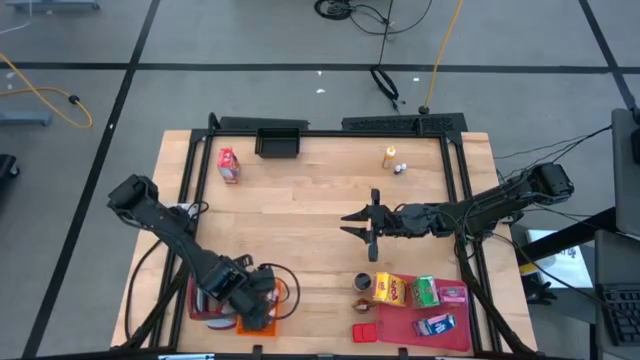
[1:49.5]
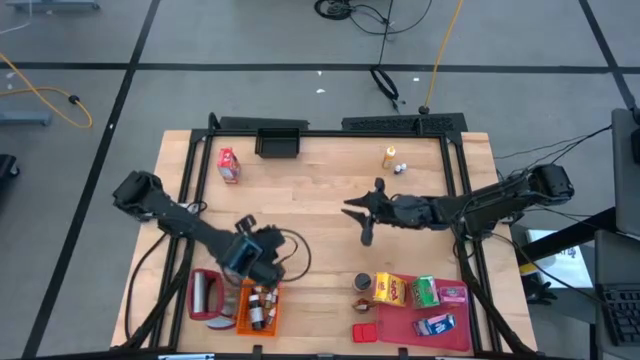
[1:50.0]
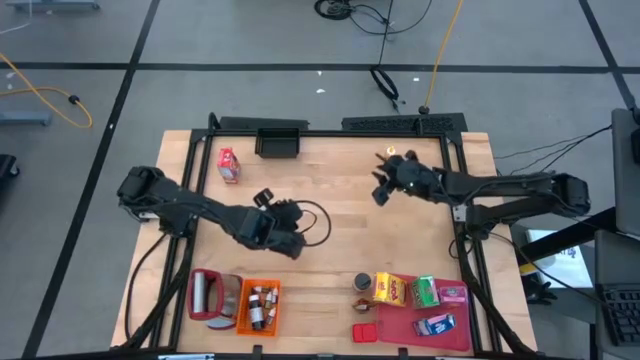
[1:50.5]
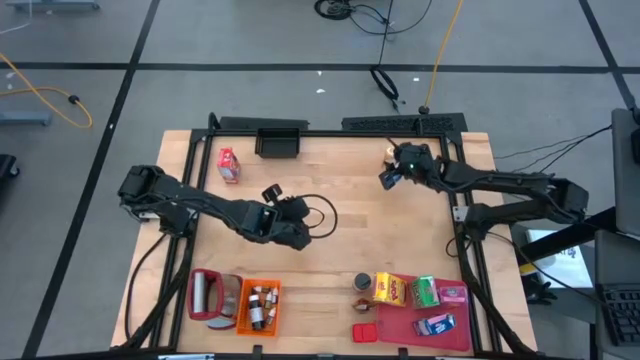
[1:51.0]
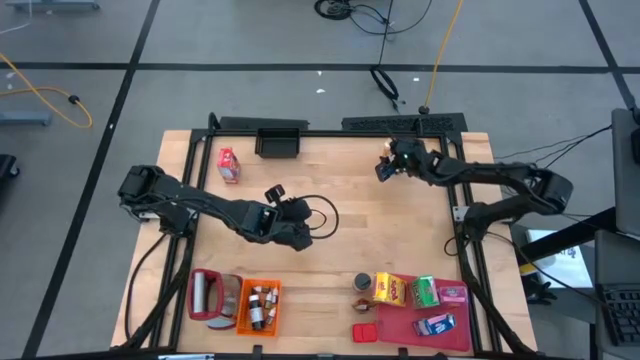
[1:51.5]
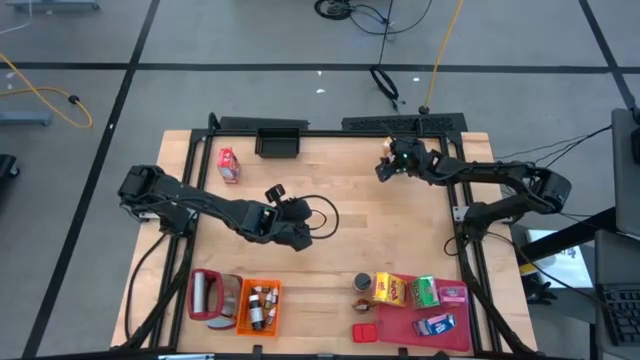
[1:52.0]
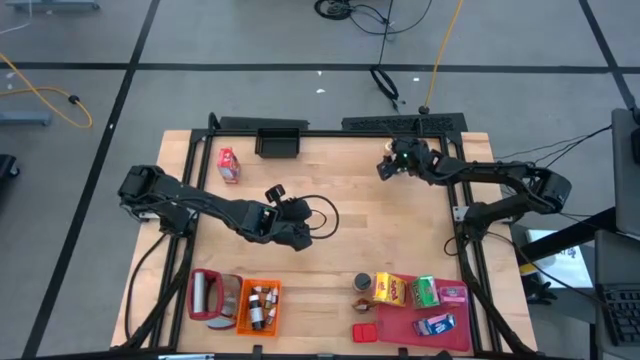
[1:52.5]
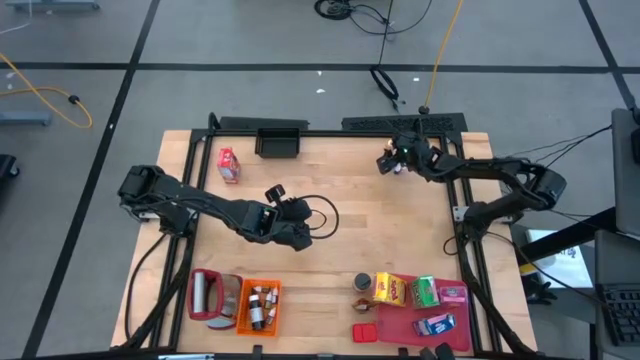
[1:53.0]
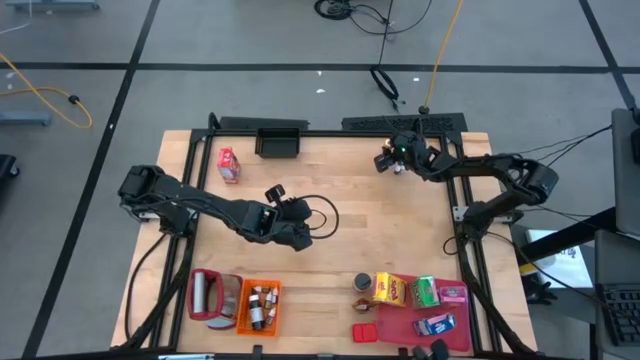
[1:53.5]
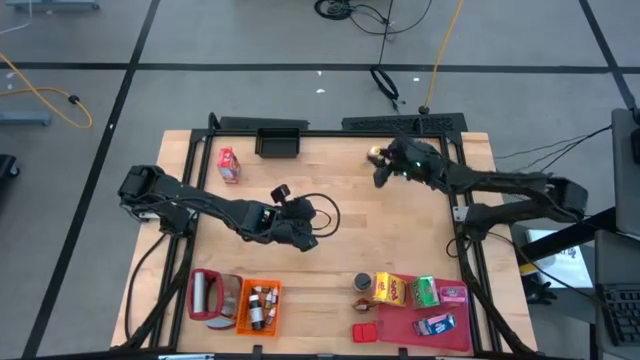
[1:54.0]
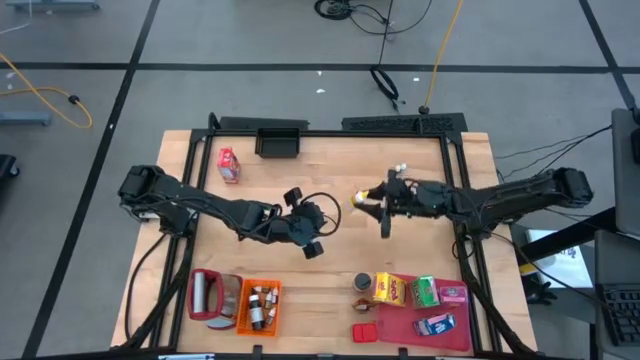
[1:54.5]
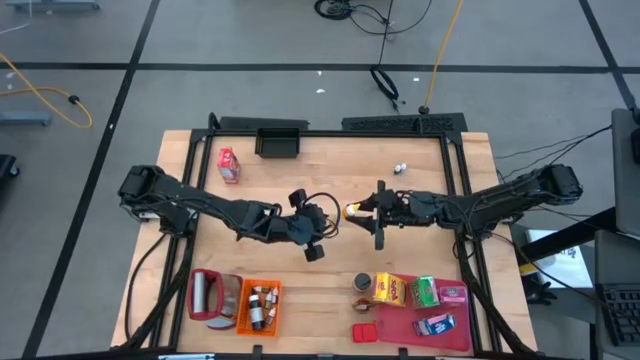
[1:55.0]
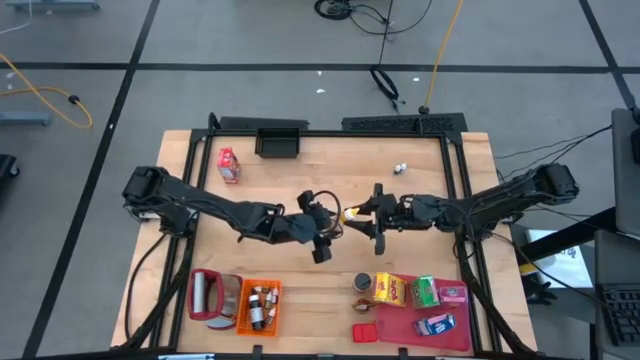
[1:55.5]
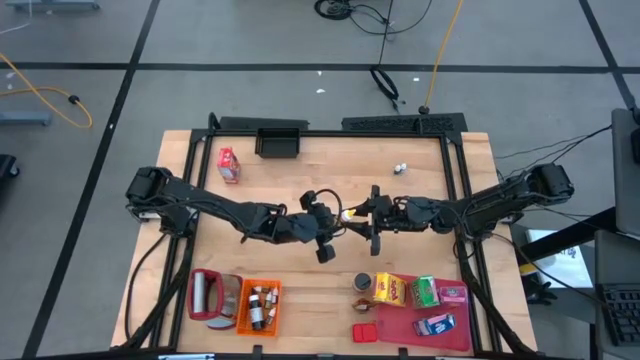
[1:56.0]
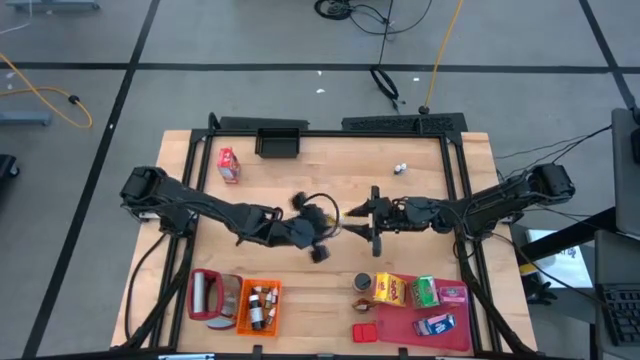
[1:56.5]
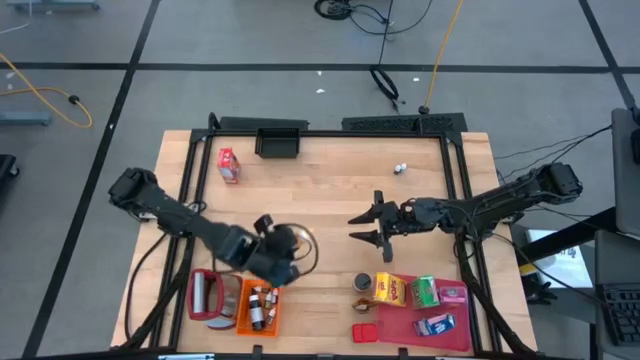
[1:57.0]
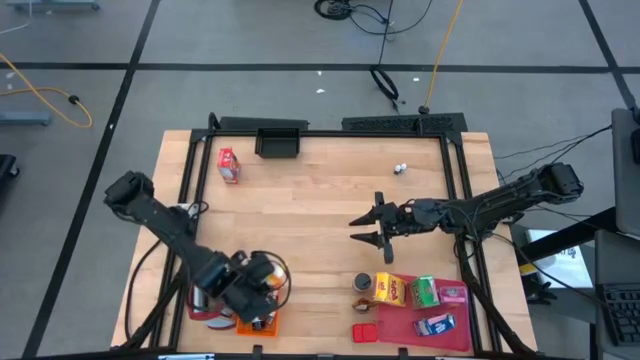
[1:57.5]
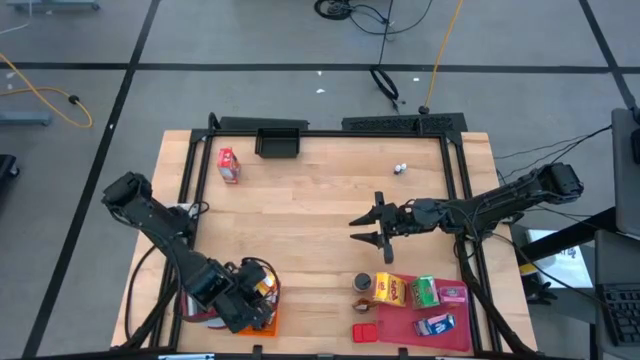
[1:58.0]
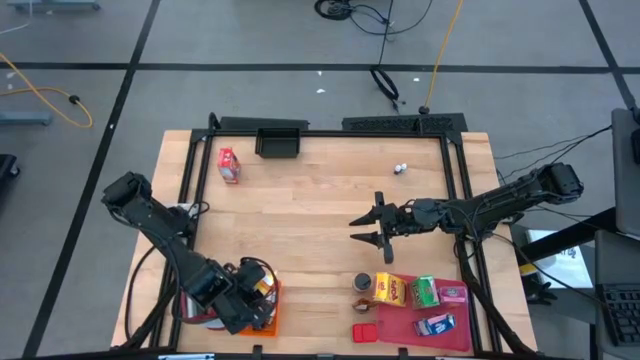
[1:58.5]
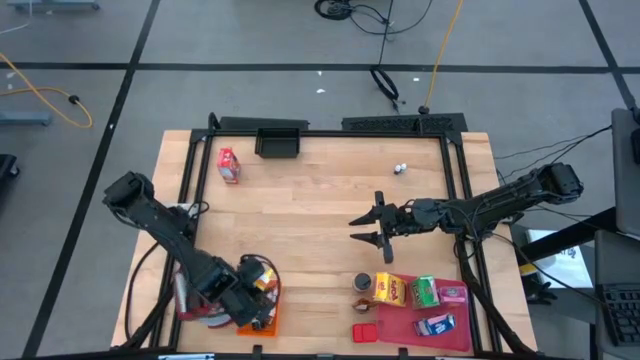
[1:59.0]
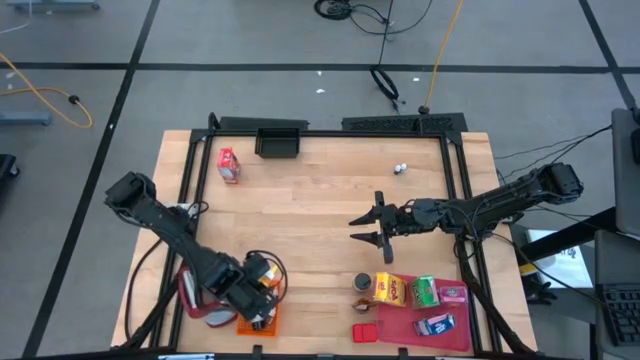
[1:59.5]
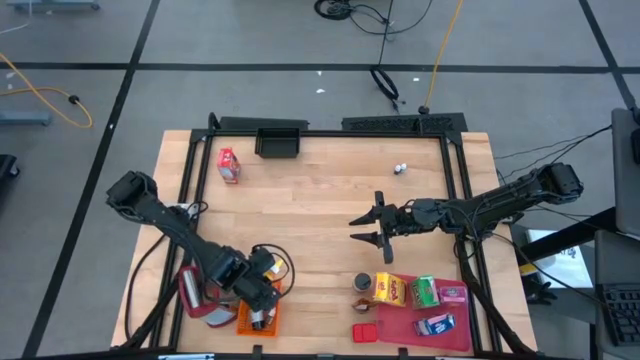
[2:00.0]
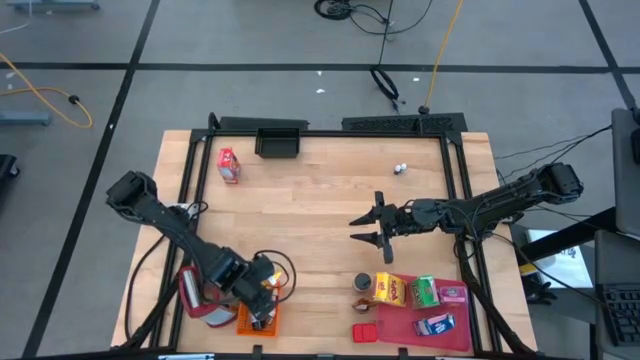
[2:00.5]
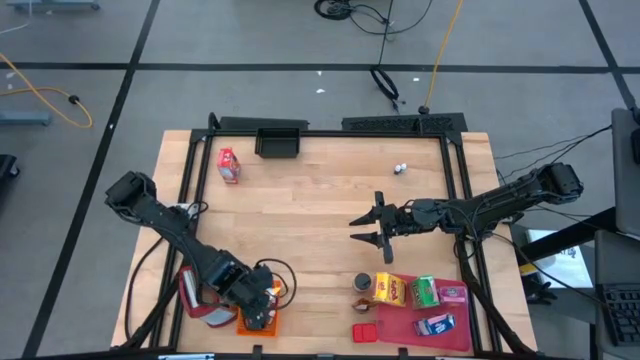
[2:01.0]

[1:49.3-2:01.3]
Task: Pick & Place Kitchen Items
Put the big yellow food coloring bottle into the orange bin

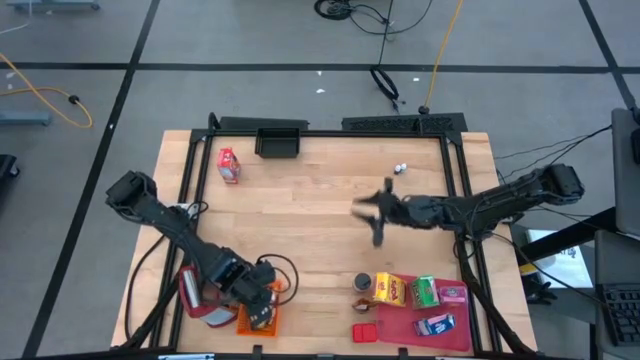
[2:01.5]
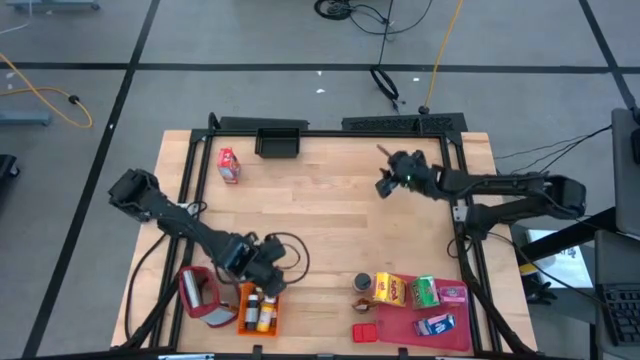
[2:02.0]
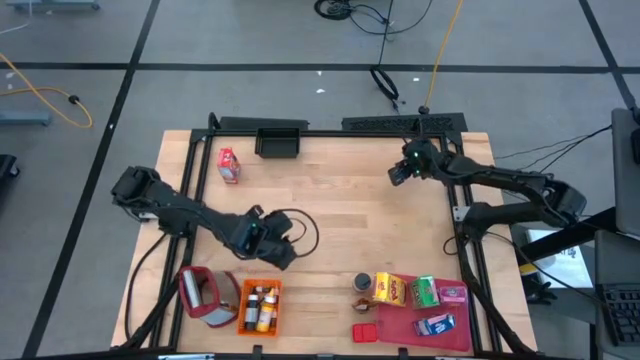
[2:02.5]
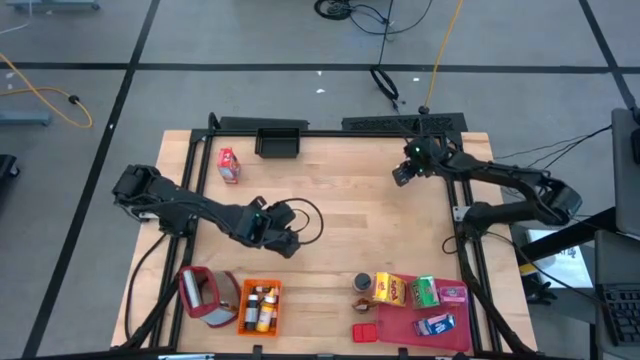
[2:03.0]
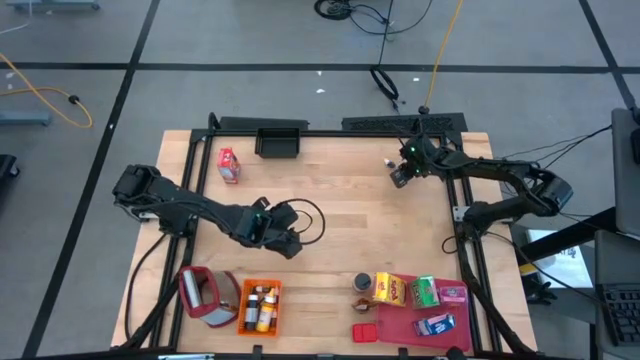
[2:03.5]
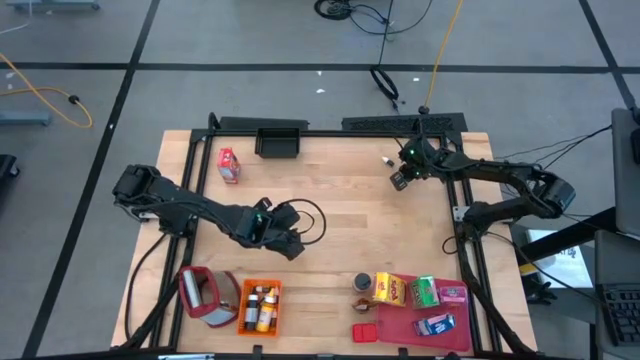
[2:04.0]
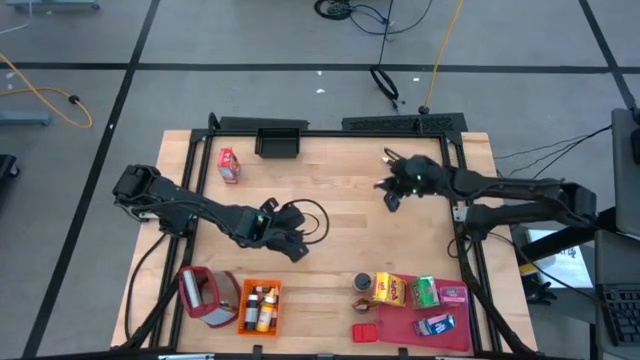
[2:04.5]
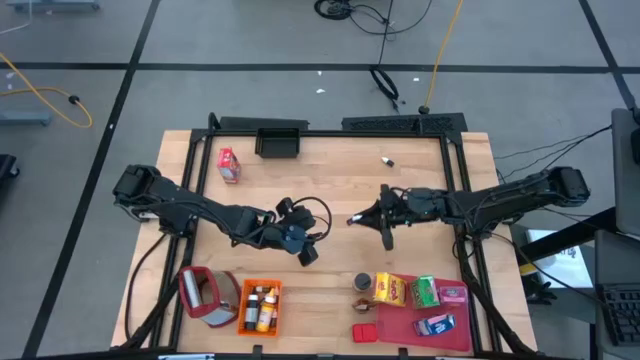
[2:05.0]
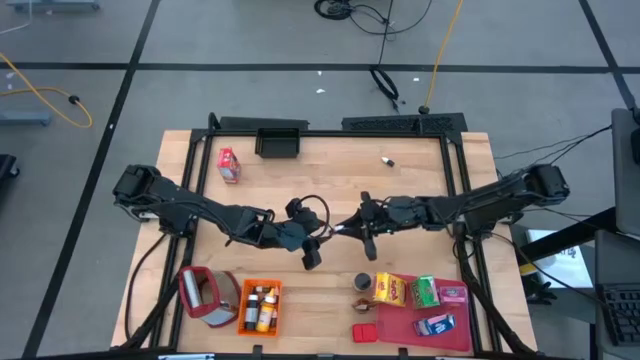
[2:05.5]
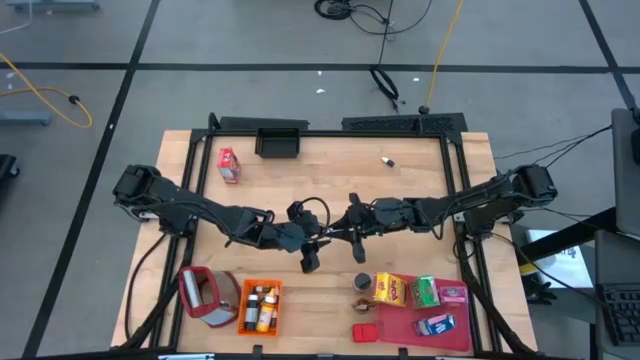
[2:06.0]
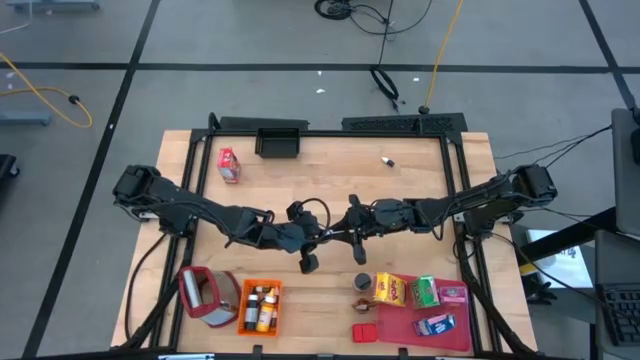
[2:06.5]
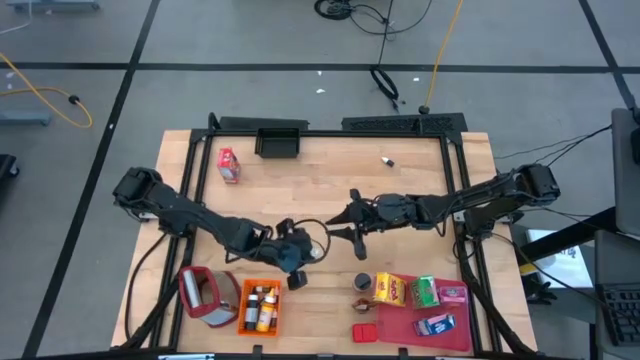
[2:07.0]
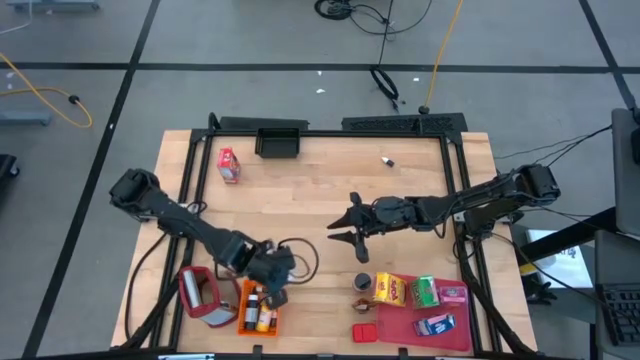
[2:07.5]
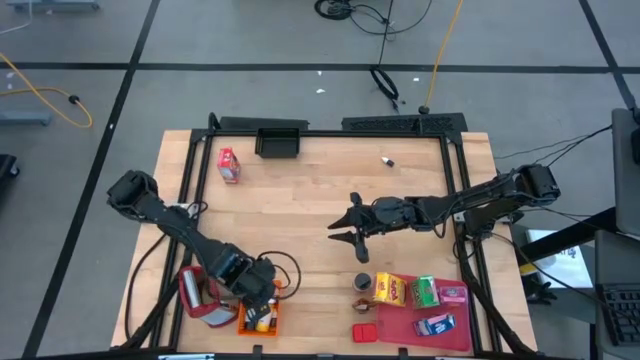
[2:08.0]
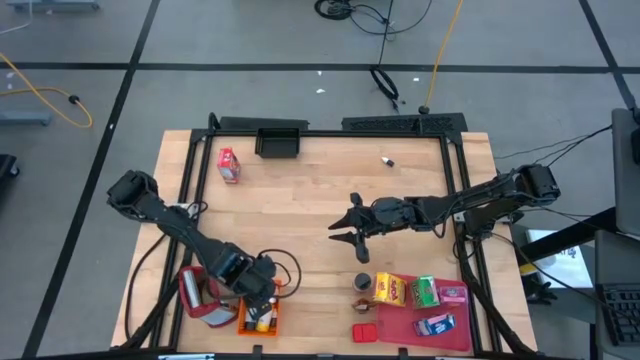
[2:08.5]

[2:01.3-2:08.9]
Put the small purple food coloring bottle into the orange bin

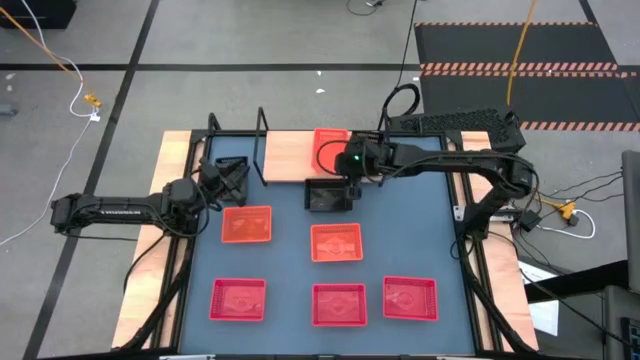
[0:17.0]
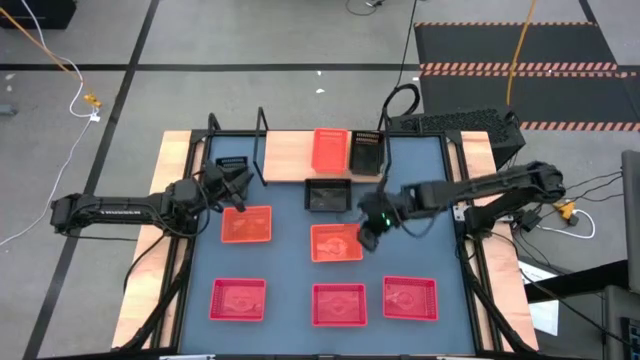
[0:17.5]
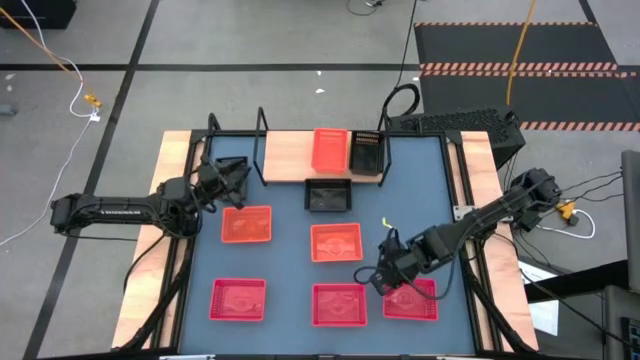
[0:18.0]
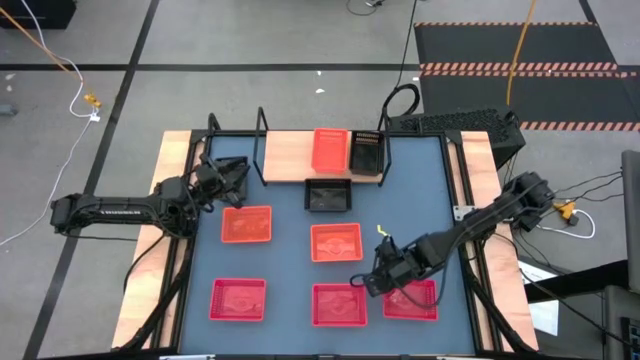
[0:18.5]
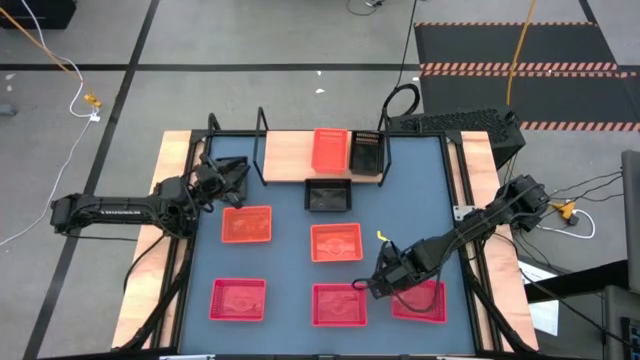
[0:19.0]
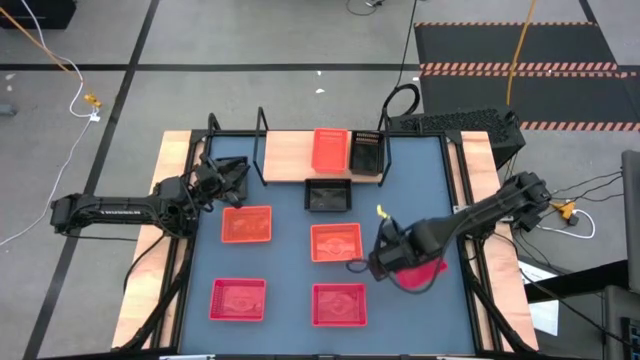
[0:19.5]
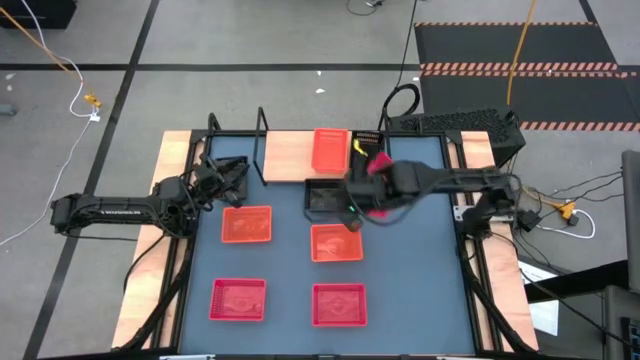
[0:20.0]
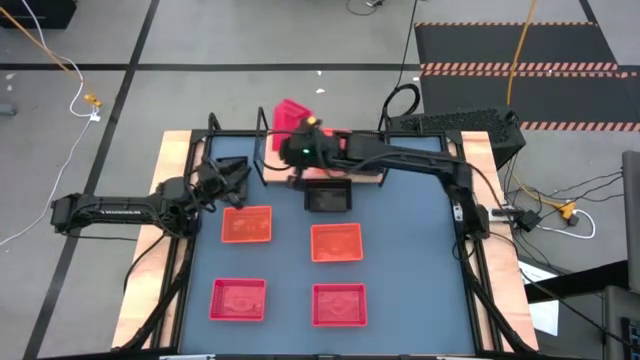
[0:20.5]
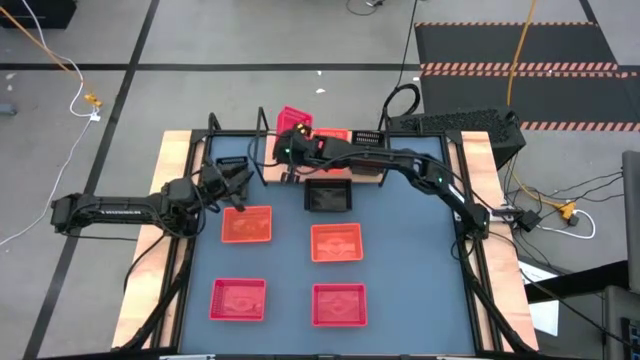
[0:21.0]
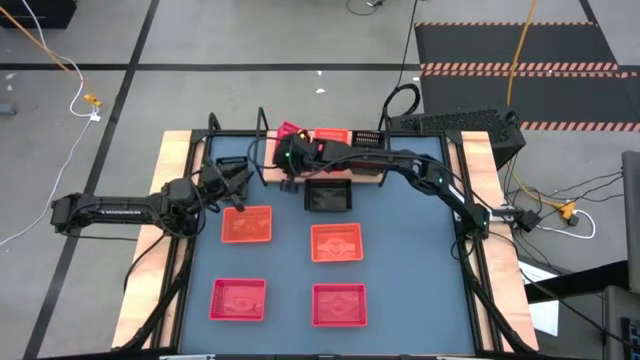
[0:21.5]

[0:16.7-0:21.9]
Task: Stack baskets on shelf by color
Put the right red bin on the shelf
